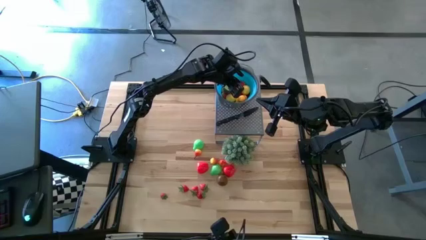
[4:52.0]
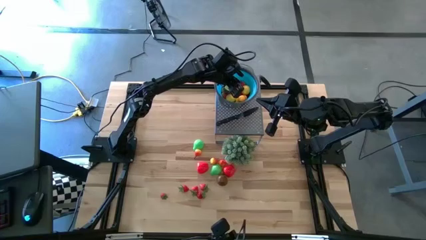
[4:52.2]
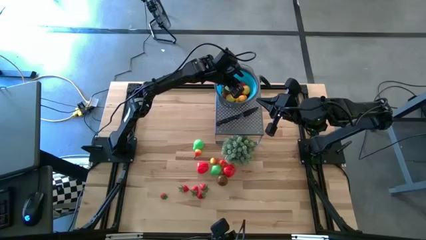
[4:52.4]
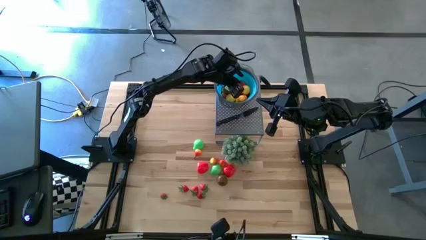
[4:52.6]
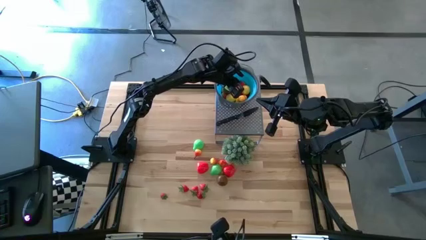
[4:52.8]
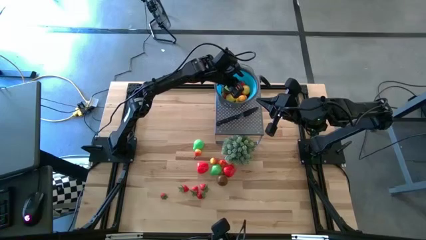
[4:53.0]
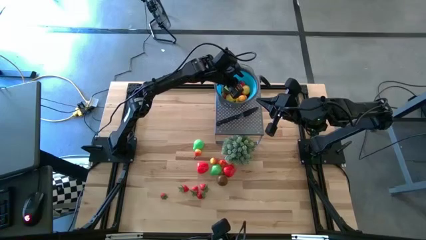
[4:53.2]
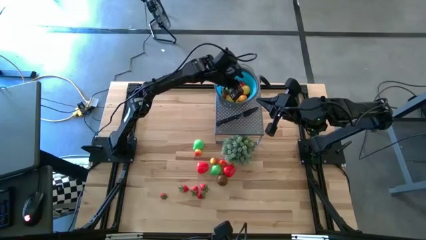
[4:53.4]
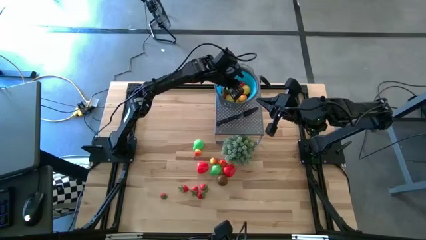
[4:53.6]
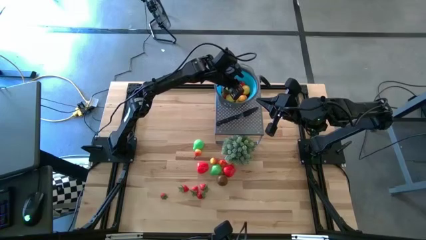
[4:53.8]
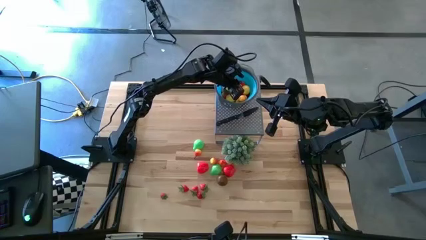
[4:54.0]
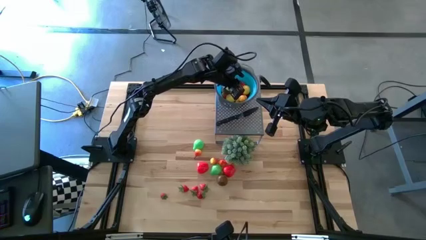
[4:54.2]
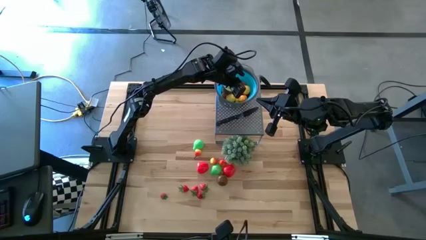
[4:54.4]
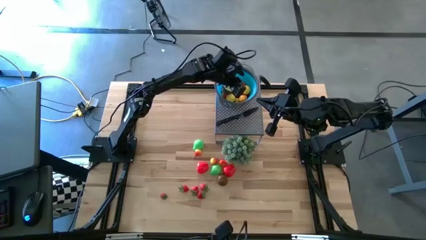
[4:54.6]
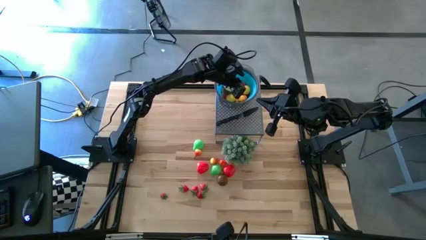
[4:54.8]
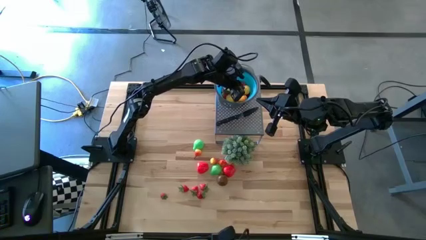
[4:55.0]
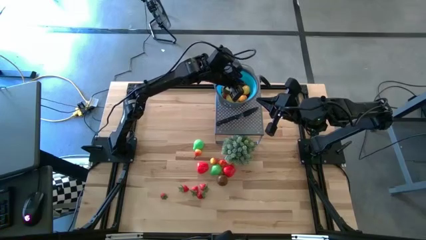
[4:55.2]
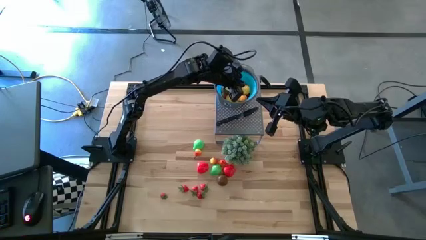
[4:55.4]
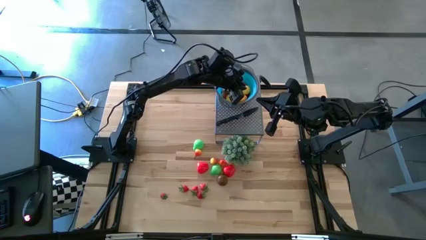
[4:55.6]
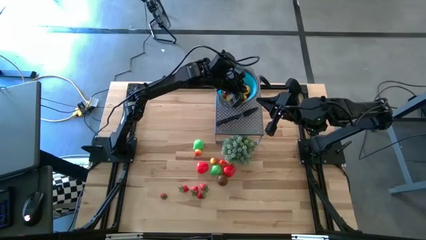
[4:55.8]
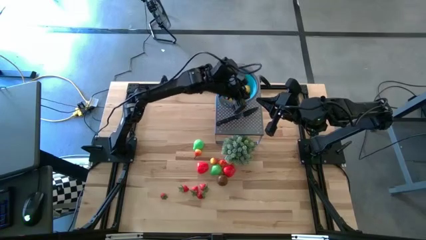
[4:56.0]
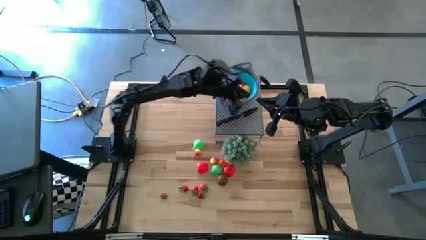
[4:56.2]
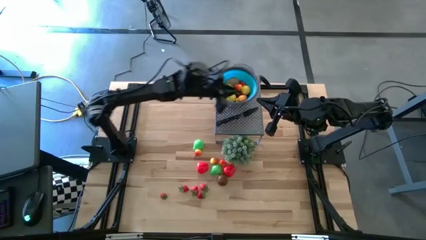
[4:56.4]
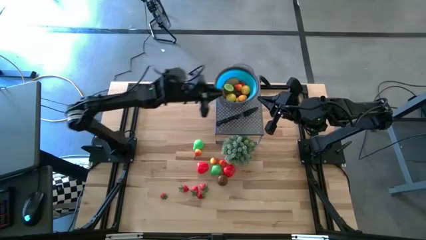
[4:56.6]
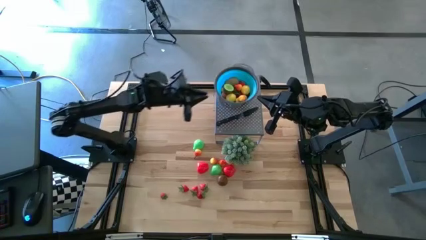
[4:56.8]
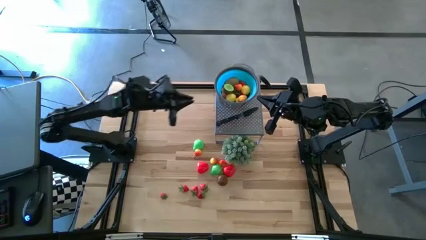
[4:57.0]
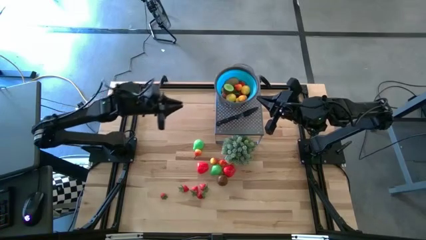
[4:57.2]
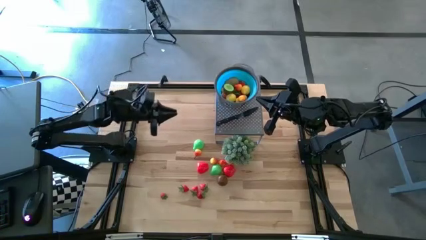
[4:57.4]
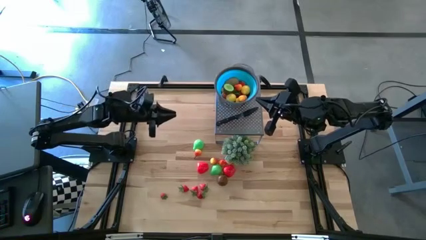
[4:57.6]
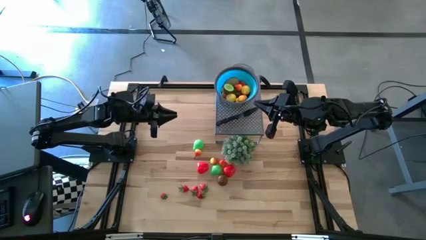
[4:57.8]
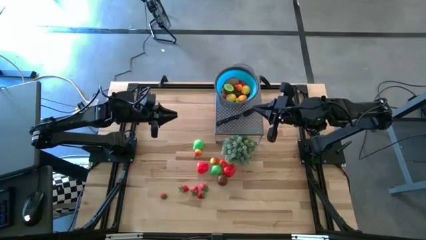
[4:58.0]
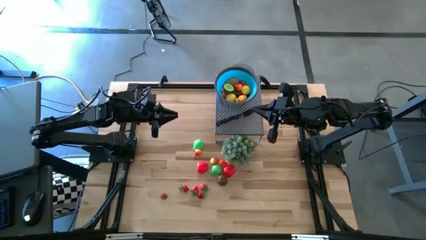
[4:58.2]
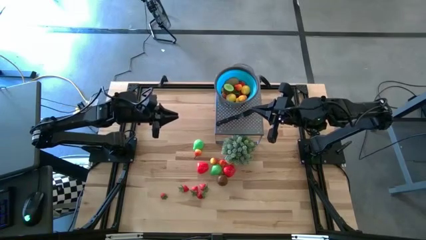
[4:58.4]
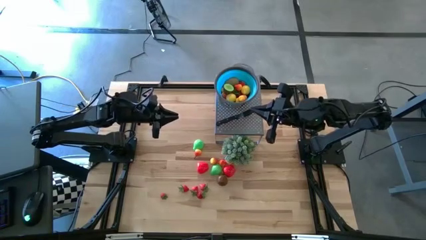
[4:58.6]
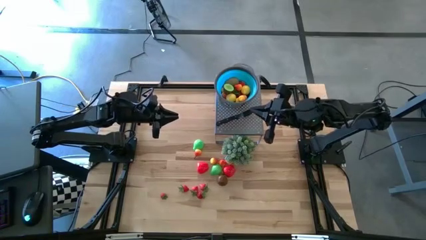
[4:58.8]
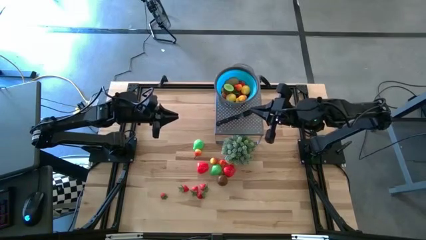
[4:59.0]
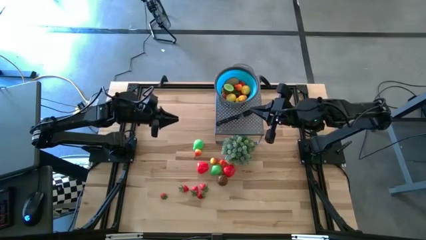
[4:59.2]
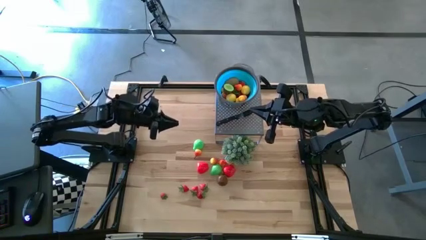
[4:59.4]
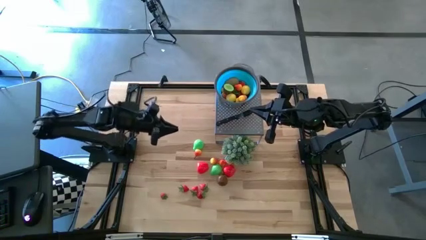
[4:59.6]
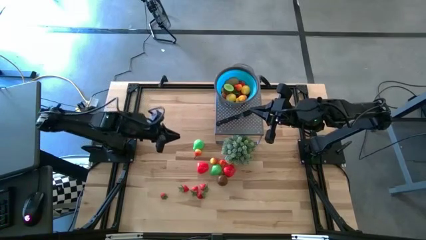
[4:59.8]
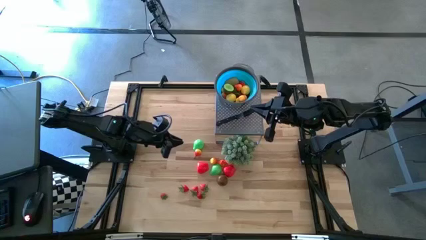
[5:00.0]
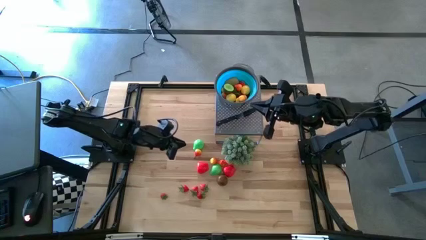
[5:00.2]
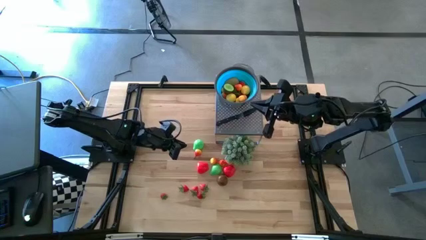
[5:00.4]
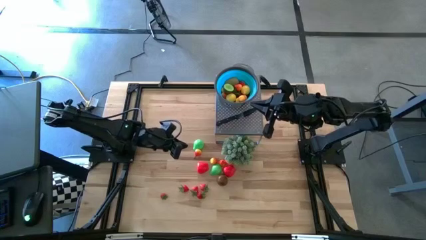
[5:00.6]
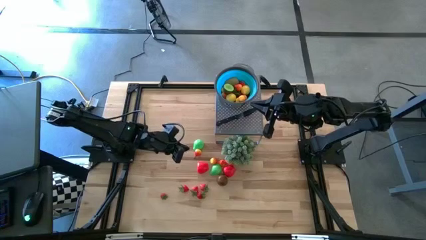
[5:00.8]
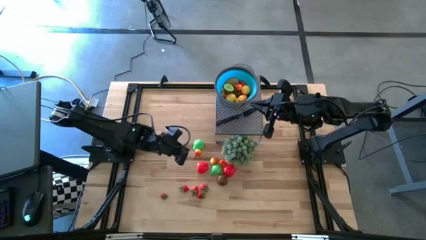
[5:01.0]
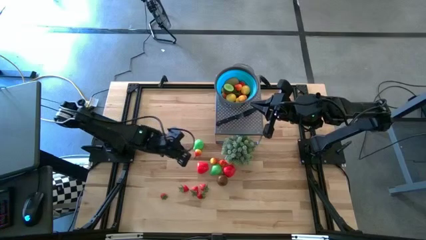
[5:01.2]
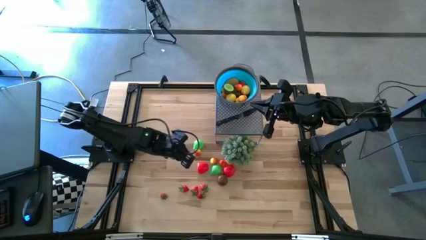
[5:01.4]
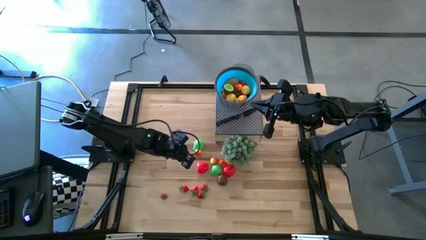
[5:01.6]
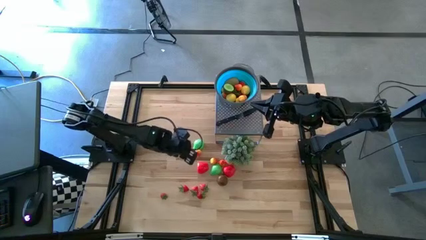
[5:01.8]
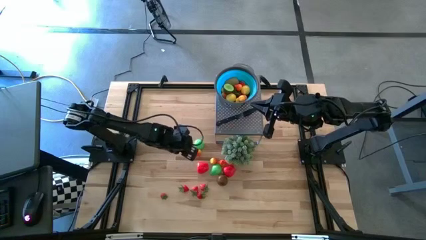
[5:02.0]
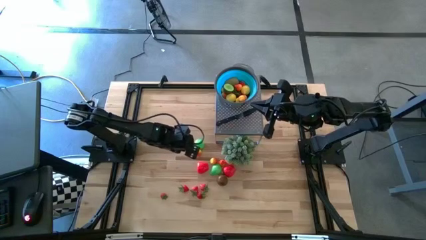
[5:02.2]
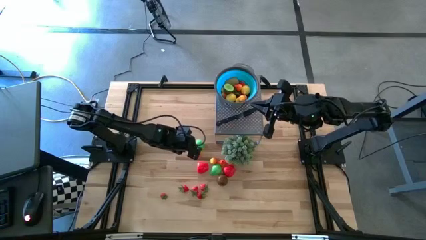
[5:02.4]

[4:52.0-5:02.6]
Task: Pick & Place Fruit
Put the orange pear into the blue strainer bowl

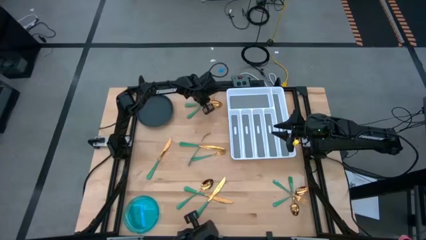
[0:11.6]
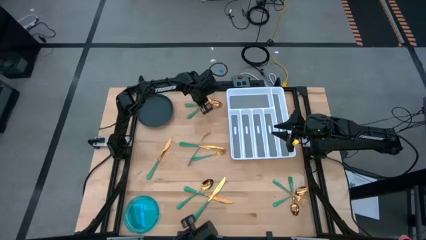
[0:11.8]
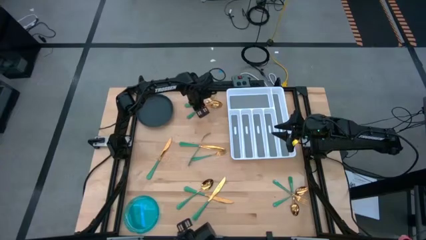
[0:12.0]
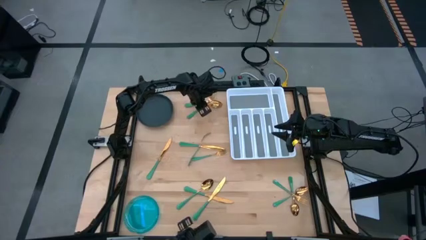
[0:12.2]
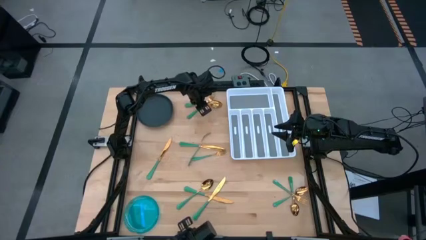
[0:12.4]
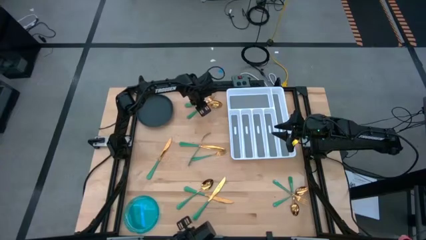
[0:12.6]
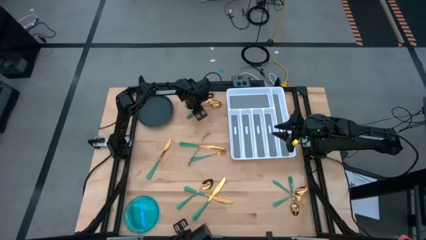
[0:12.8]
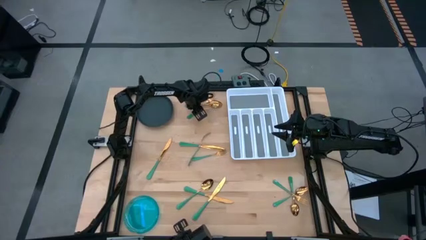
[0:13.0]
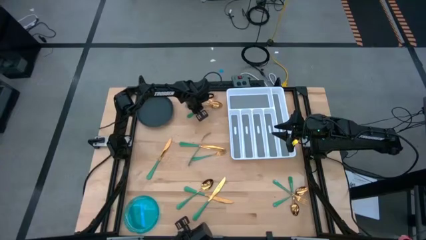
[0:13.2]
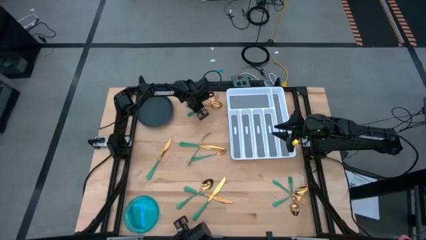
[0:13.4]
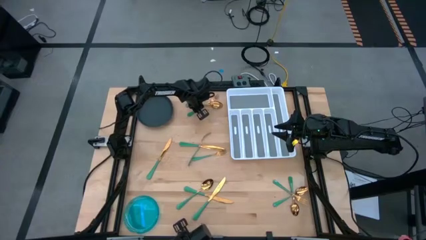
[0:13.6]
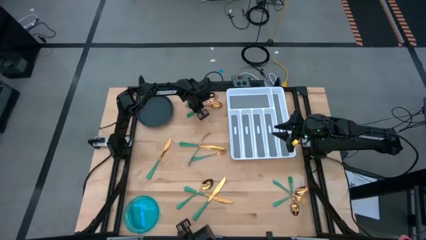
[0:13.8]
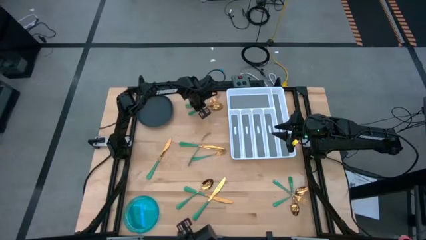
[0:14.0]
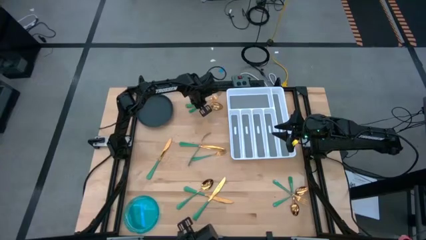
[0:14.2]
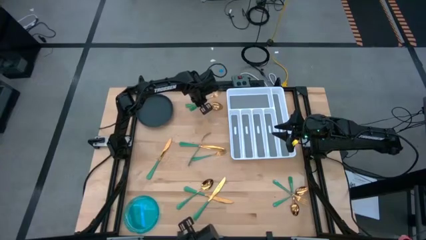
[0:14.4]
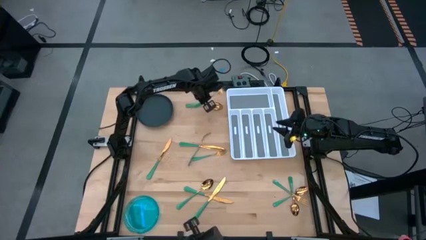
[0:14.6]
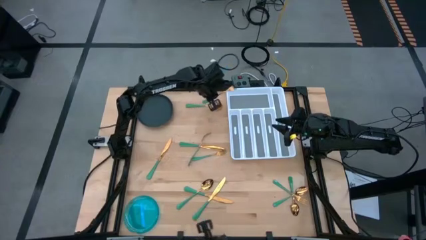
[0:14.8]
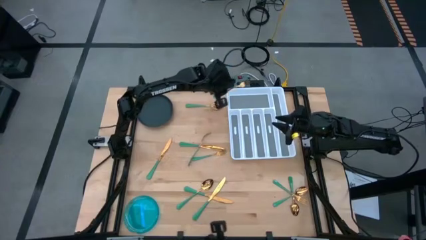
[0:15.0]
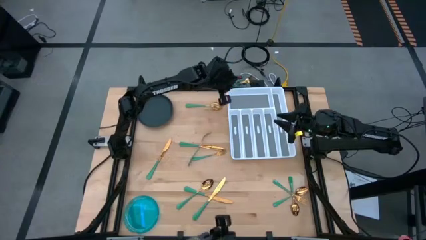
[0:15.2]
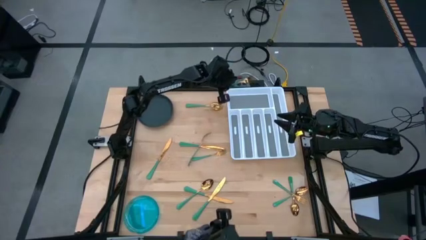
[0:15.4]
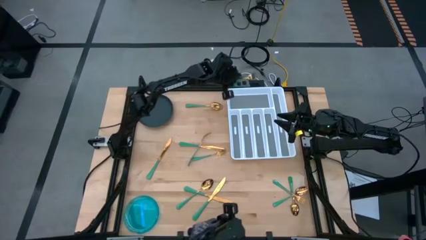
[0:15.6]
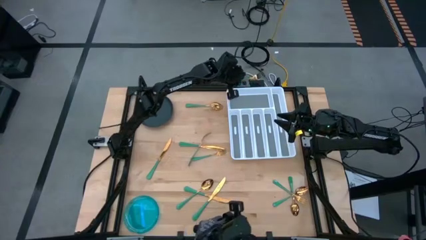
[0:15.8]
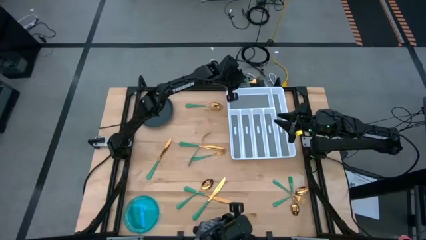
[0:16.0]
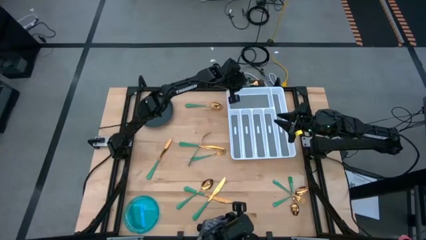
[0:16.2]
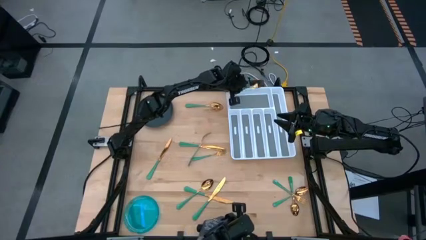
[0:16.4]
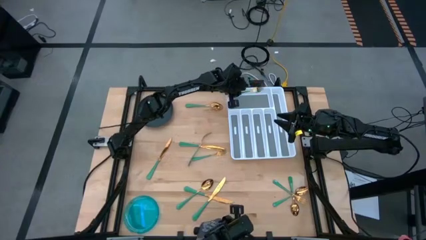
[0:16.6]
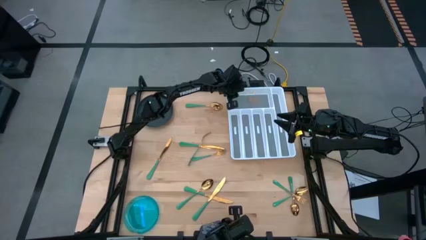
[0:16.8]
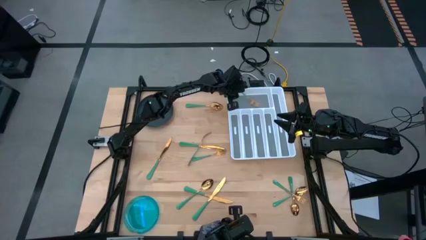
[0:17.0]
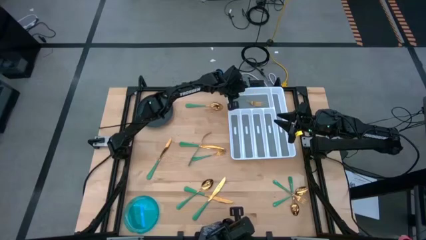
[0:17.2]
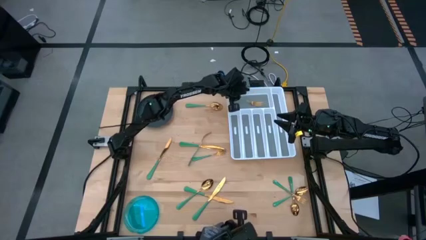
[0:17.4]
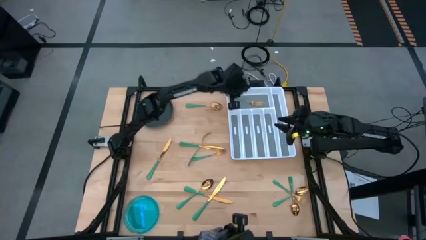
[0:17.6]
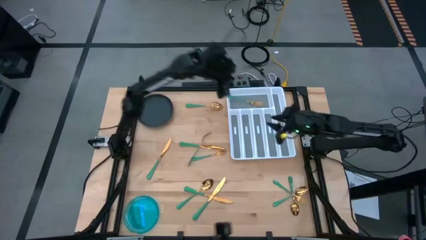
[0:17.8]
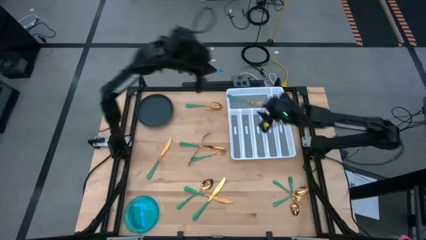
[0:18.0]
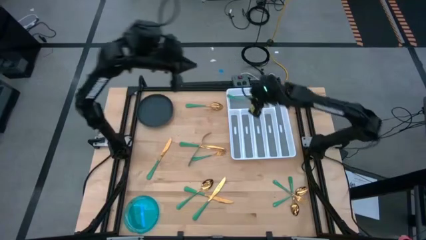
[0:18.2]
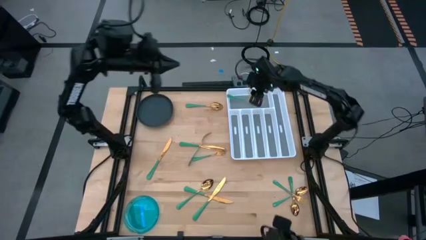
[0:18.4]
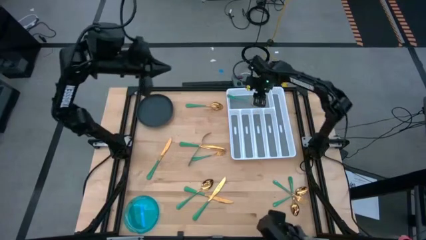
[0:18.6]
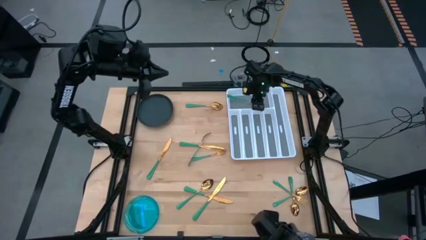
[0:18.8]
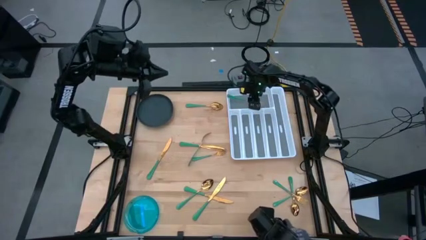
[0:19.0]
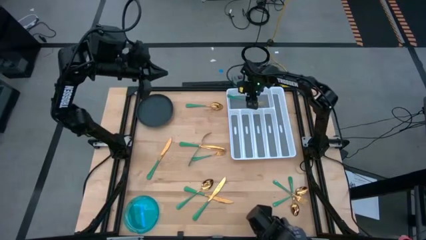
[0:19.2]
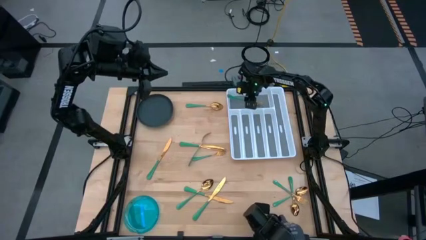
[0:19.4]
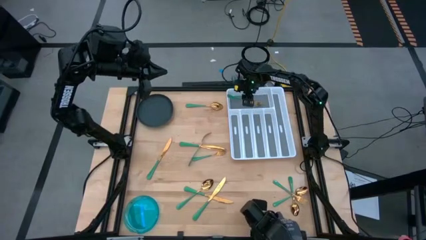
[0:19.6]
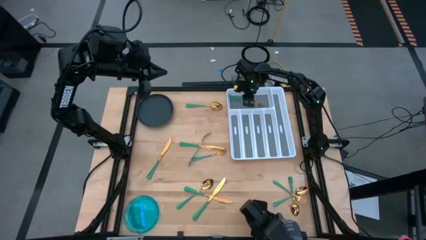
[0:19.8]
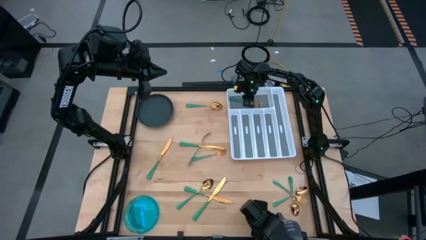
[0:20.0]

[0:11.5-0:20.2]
Task: Sort silverware
Put the green fork into the silverware tray
